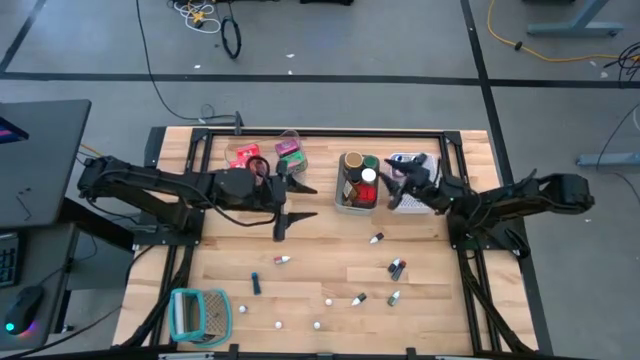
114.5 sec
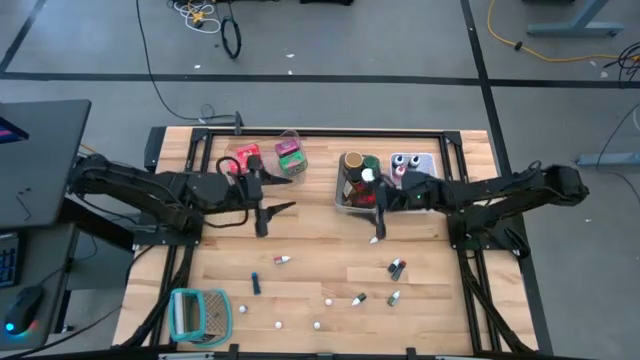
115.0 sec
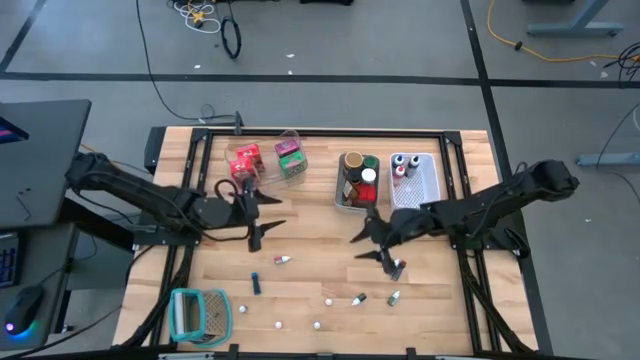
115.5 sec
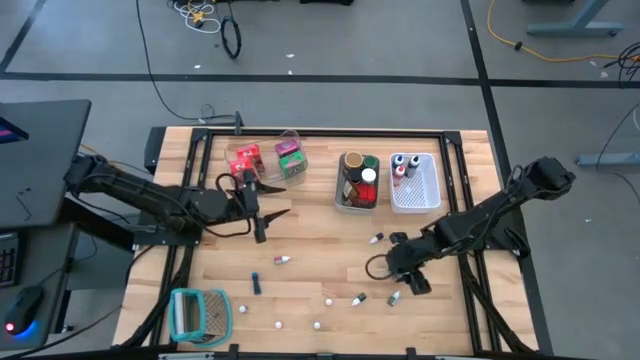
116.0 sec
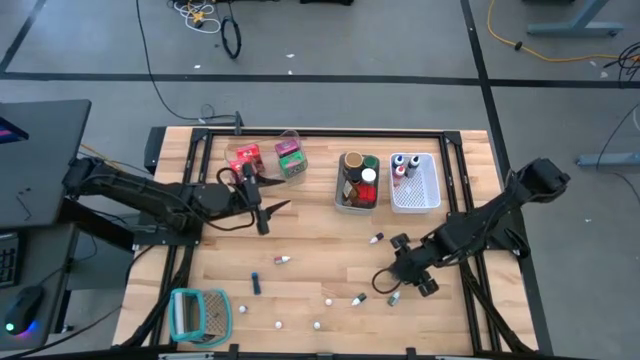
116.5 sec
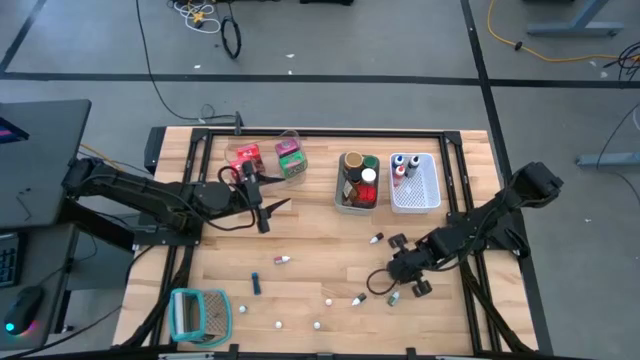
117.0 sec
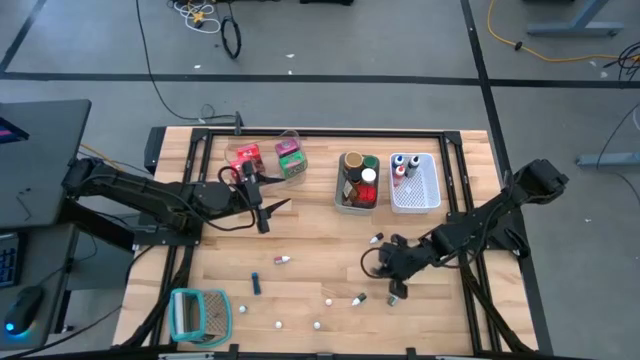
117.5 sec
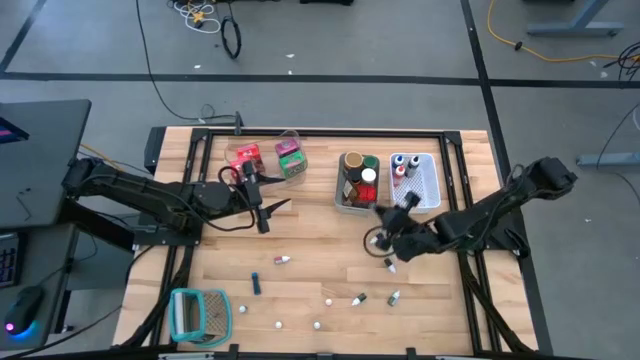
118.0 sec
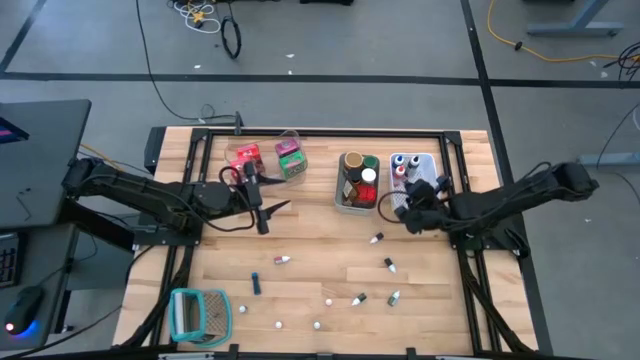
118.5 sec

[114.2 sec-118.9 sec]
Task: Pick & Place Kitchen Items
Put the small orange food coloring bottle into the white bin

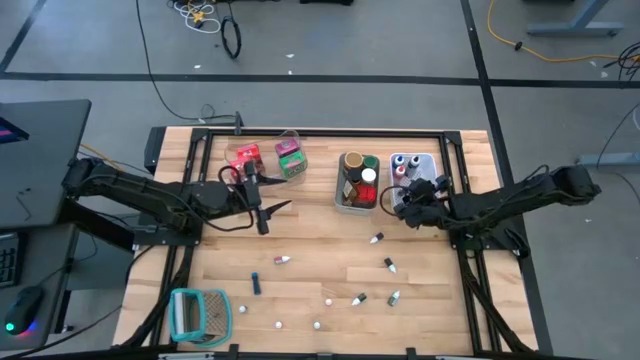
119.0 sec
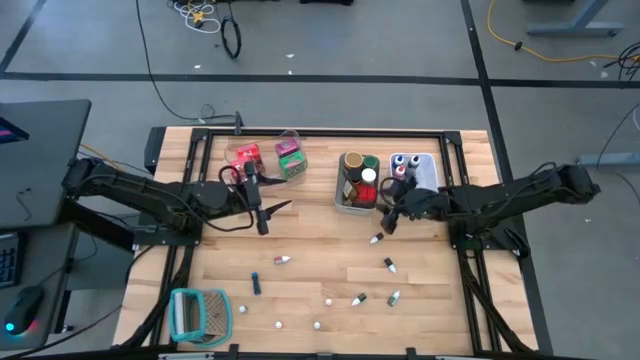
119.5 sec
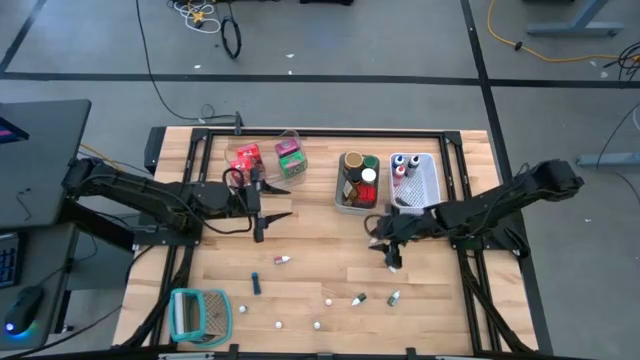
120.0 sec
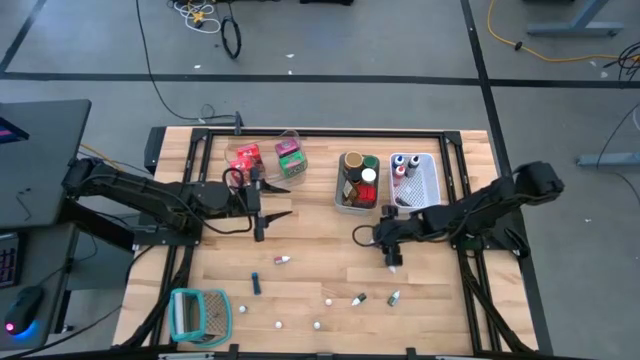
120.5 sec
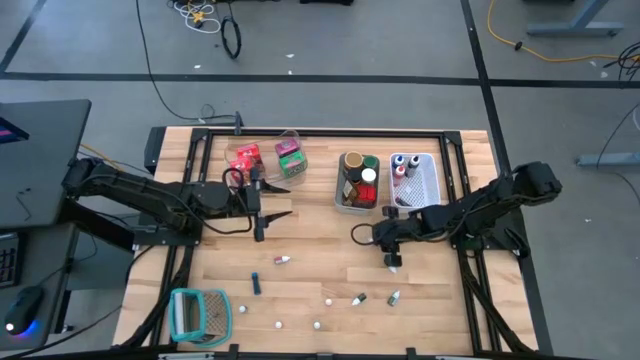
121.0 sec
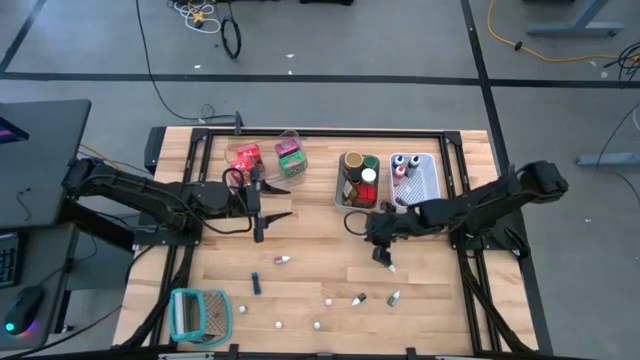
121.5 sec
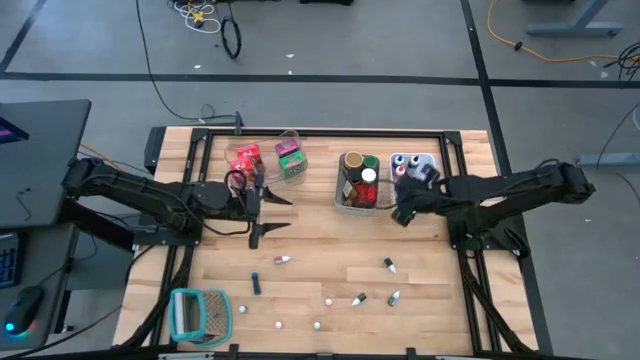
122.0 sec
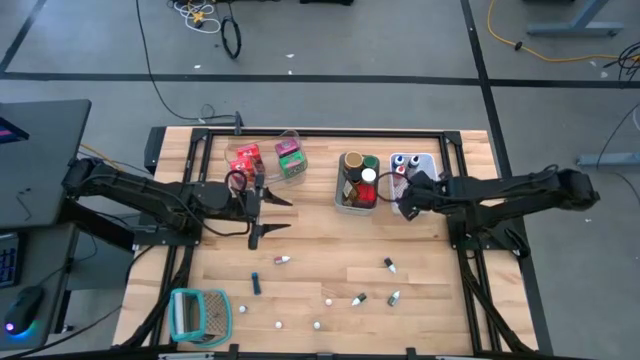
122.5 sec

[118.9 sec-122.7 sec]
Put the small red food coloring bottle into the white bin

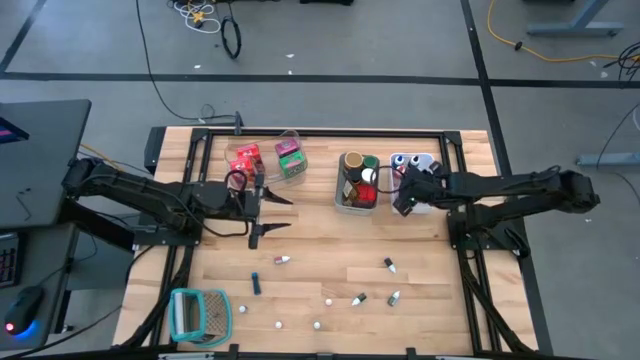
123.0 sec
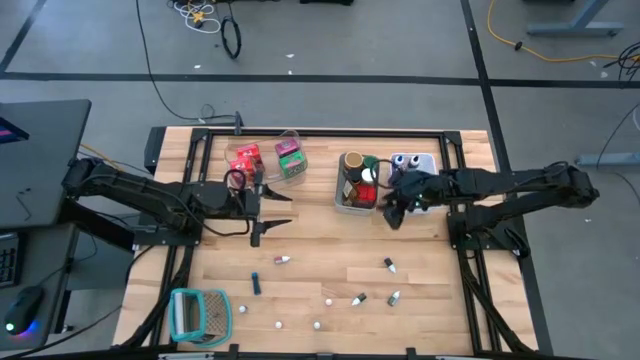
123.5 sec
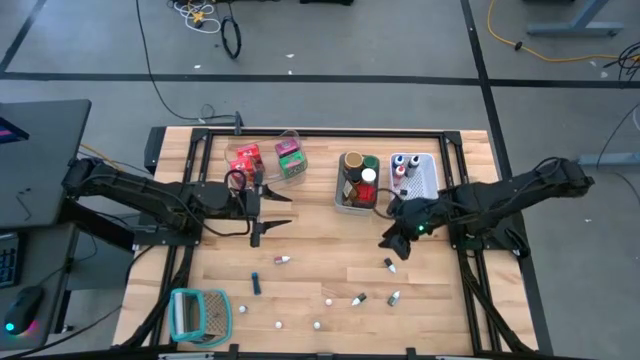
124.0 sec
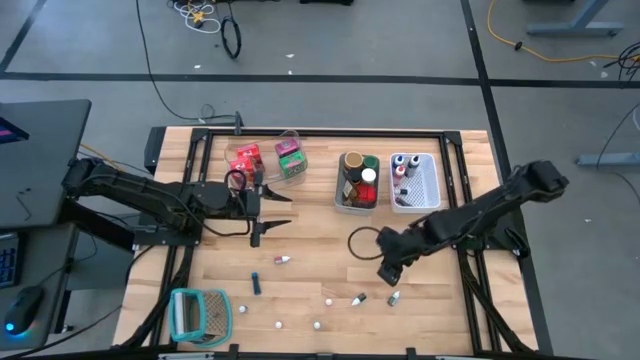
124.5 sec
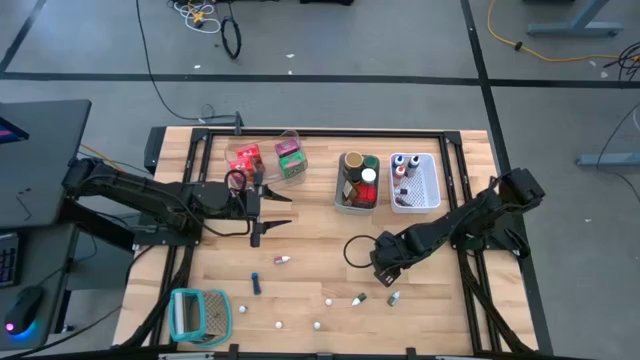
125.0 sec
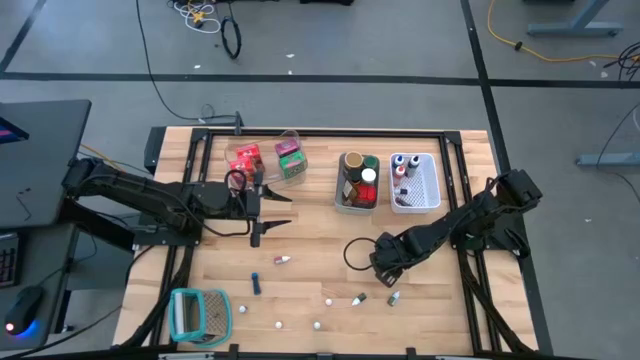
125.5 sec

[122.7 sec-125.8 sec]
Put the small purple food coloring bottle into the white bin

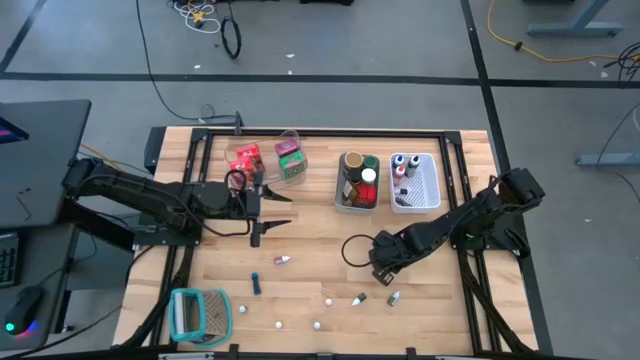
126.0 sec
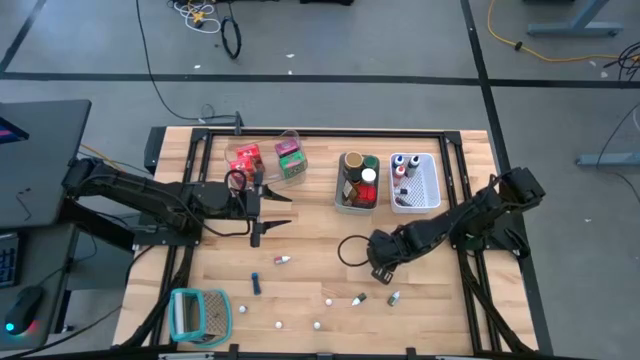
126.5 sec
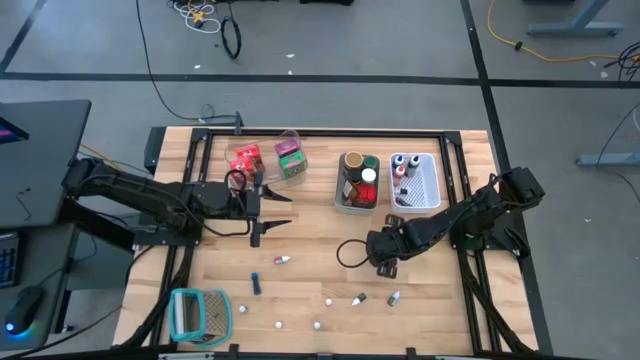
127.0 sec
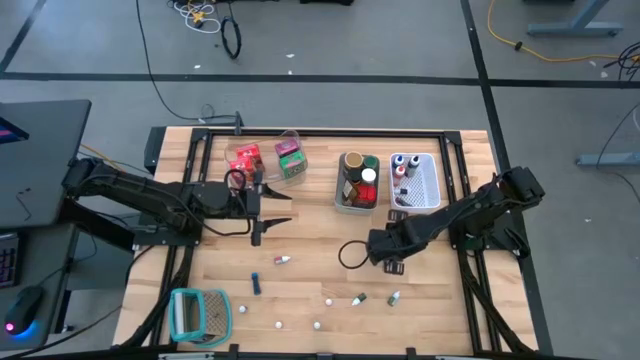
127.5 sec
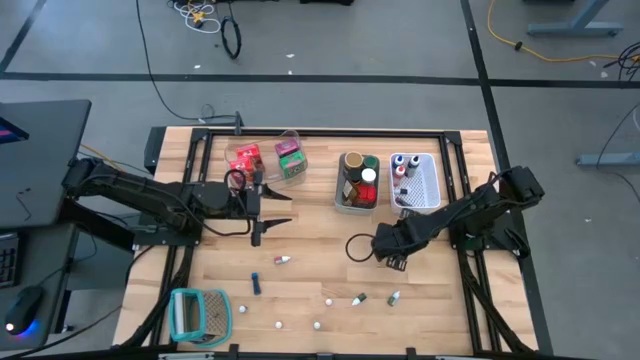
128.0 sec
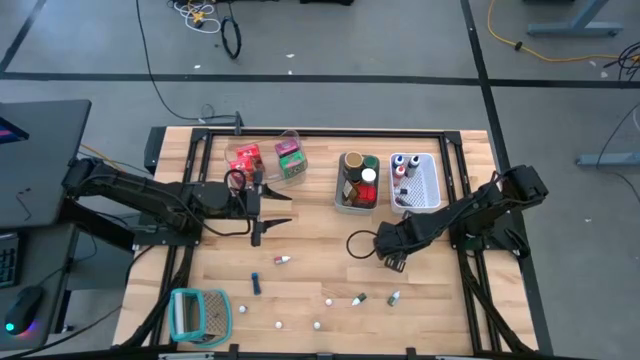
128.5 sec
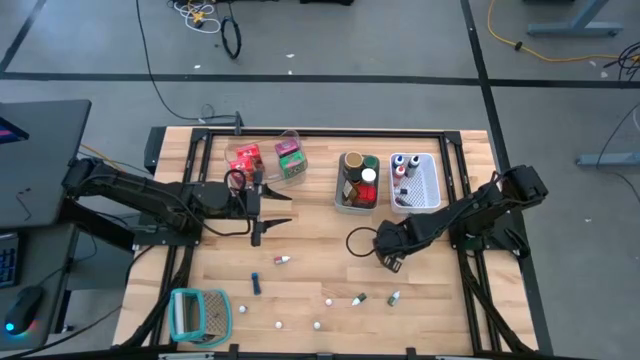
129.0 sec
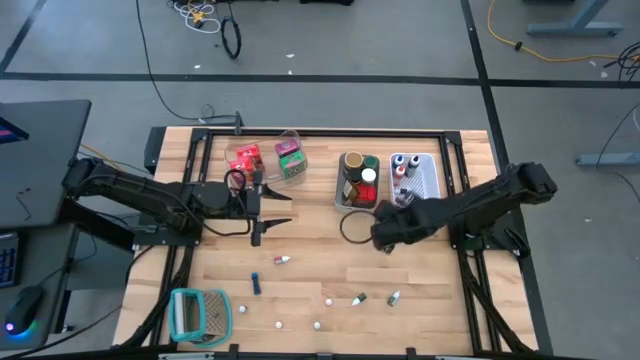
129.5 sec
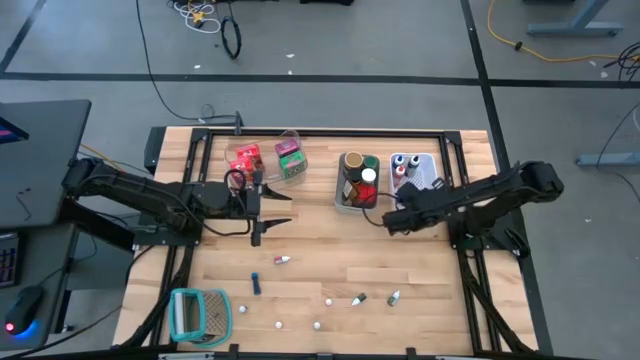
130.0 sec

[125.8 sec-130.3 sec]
Put the small purple food coloring bottle into the white bin

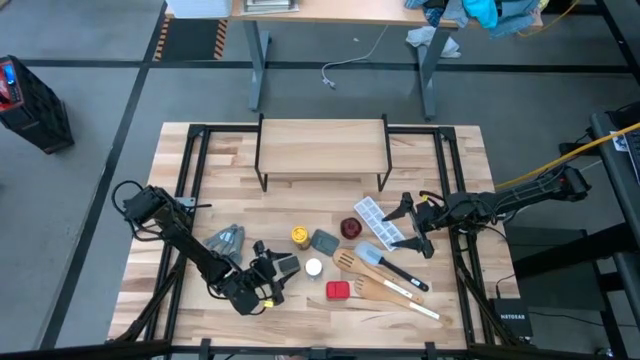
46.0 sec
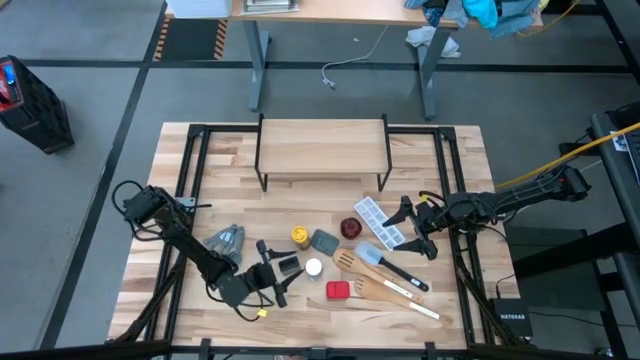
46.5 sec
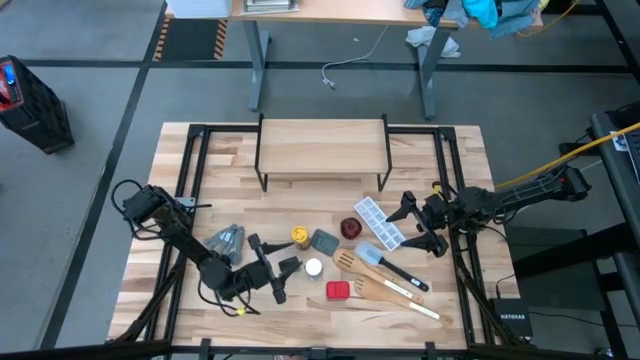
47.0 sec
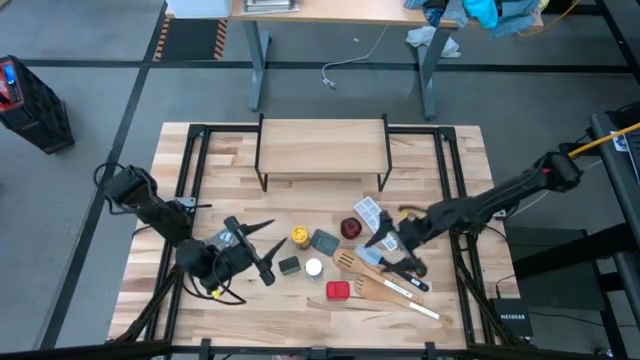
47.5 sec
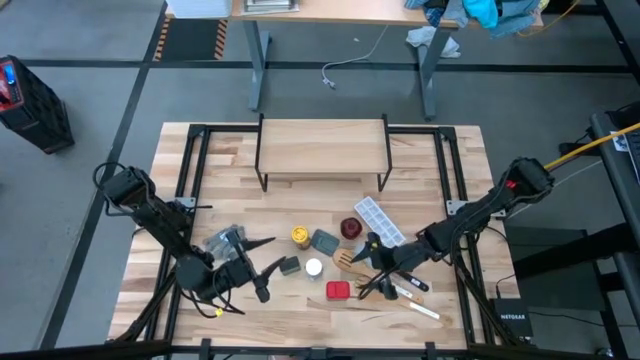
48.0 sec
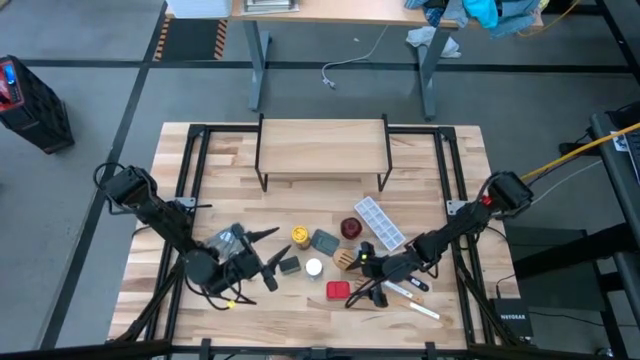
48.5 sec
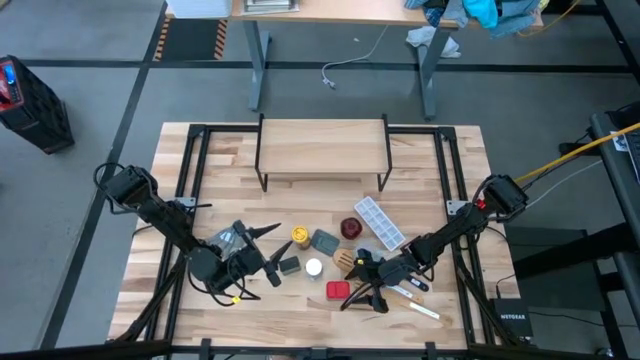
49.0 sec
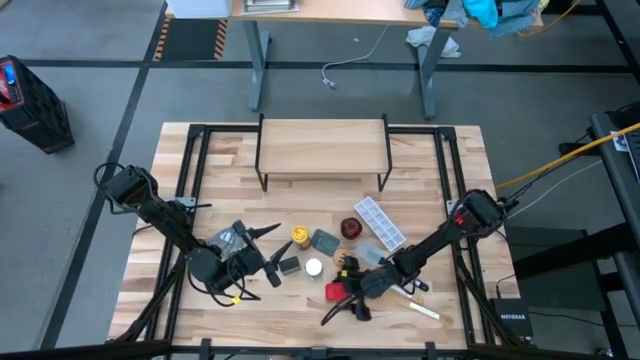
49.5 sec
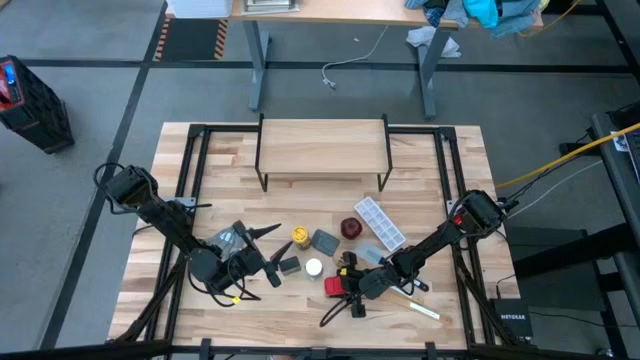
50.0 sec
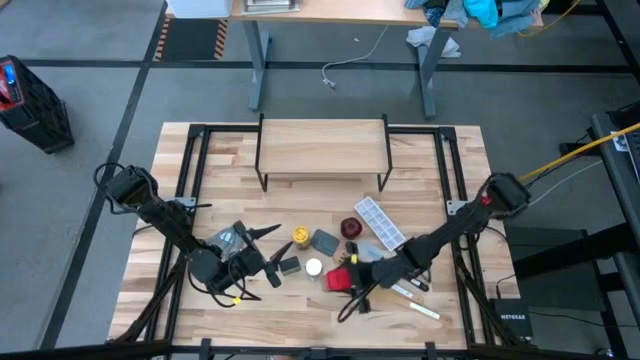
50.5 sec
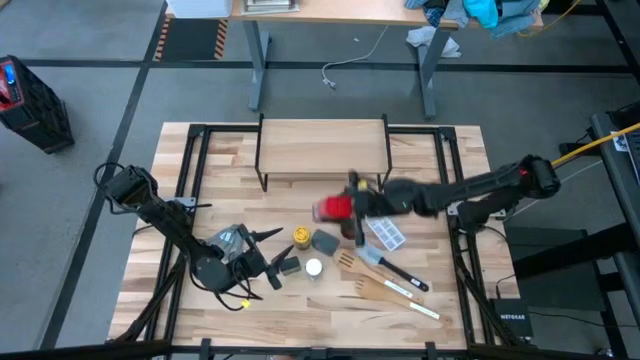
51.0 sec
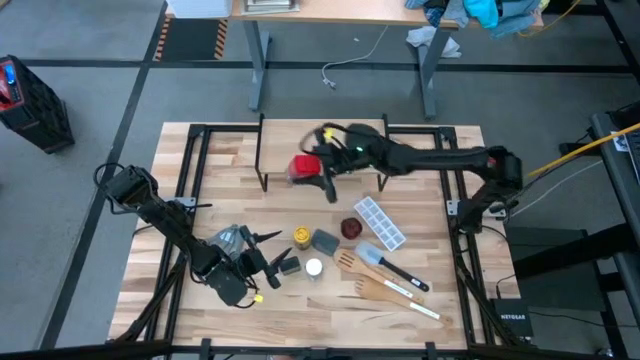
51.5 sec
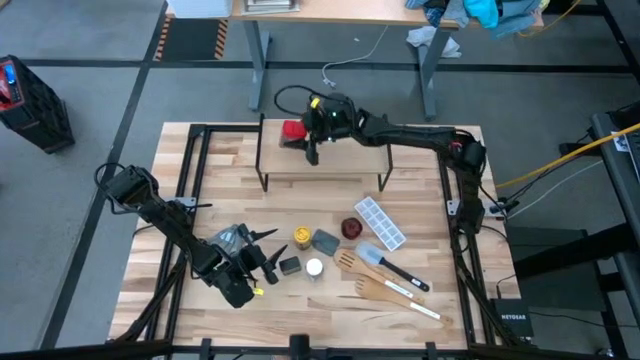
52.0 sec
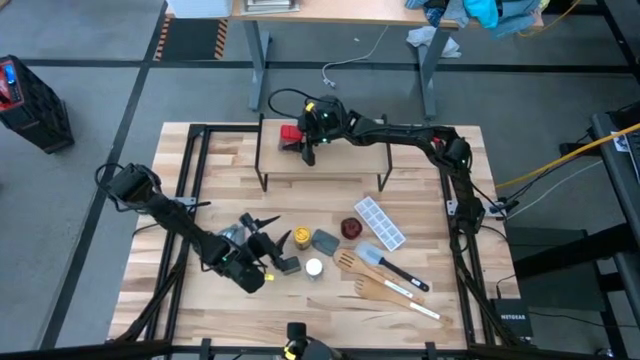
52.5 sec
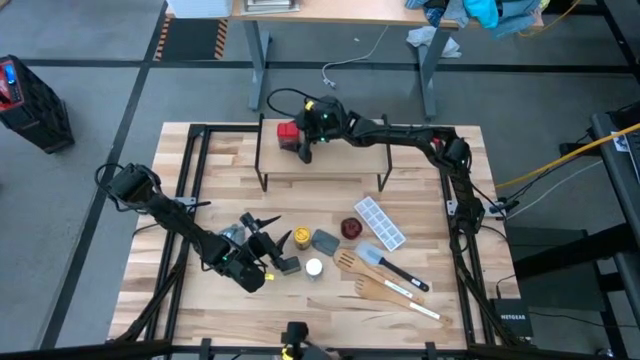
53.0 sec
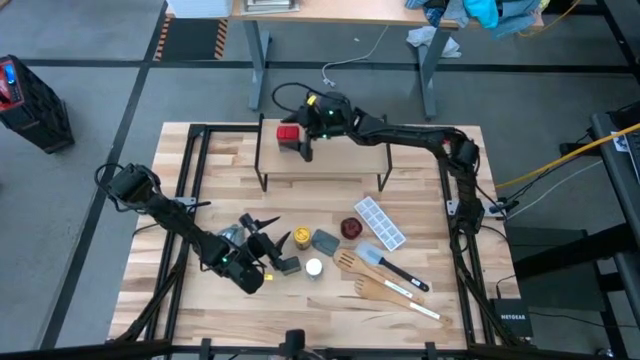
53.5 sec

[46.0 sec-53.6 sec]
Task: Shelf spices
Put the red seasoning can on the shelf
